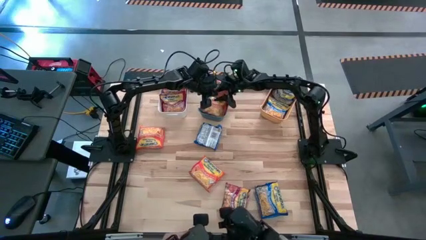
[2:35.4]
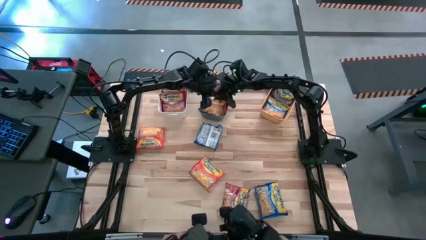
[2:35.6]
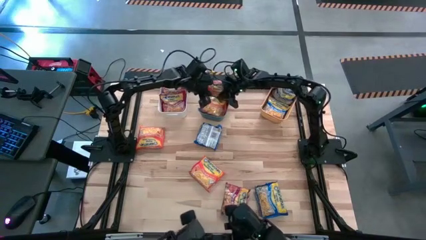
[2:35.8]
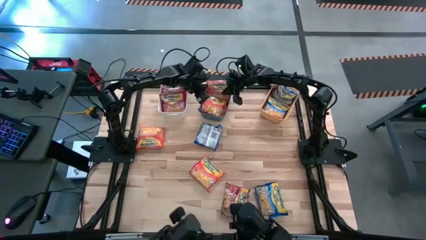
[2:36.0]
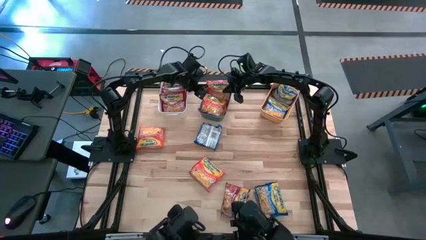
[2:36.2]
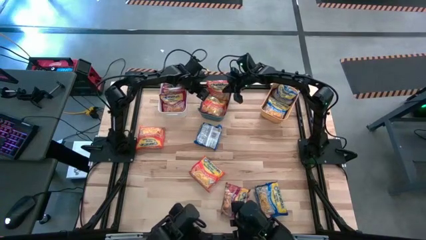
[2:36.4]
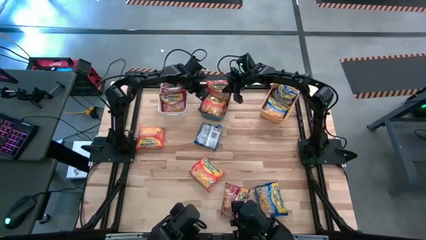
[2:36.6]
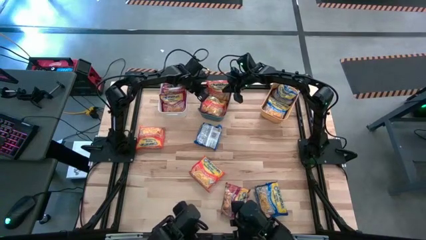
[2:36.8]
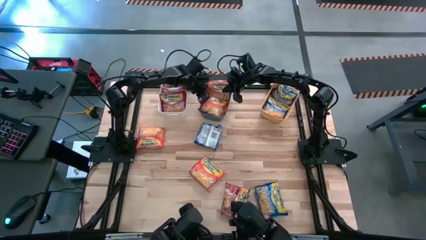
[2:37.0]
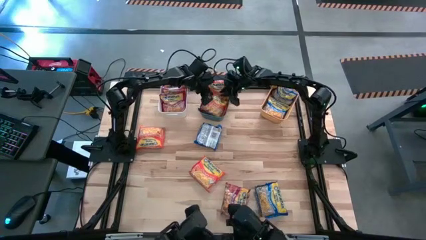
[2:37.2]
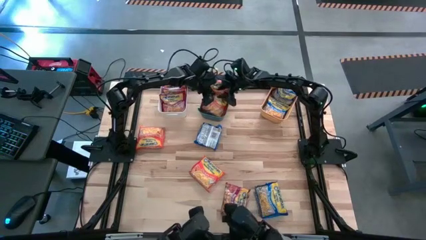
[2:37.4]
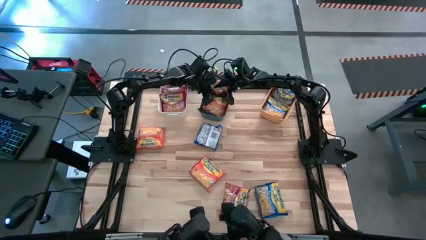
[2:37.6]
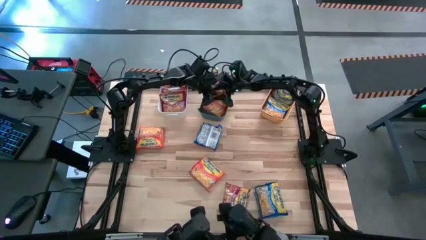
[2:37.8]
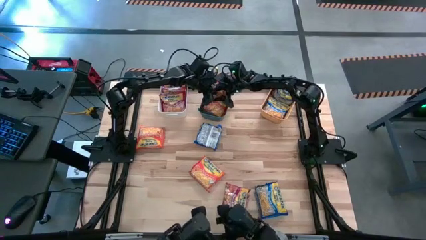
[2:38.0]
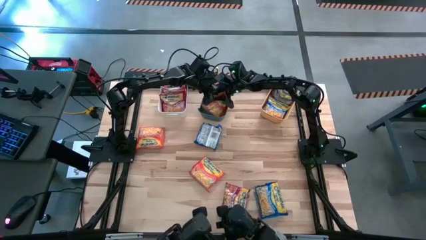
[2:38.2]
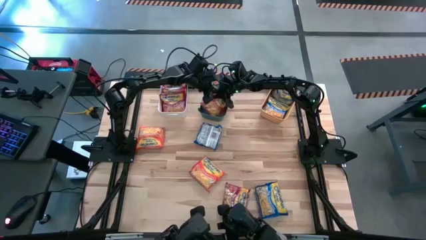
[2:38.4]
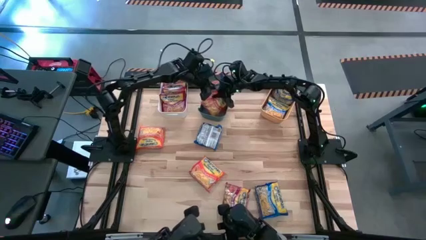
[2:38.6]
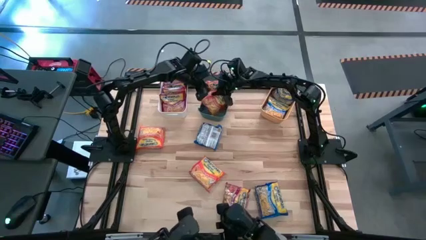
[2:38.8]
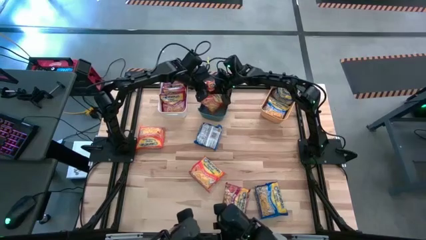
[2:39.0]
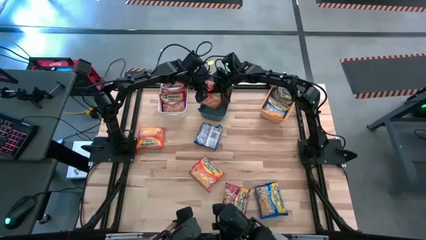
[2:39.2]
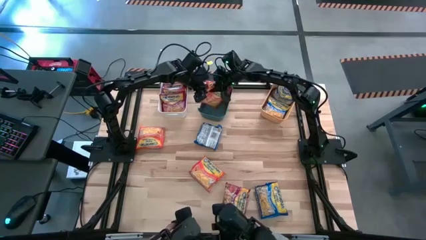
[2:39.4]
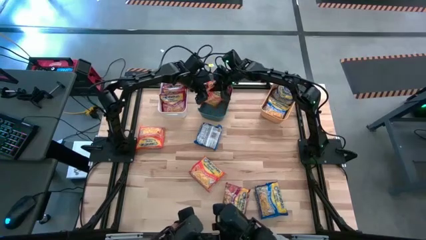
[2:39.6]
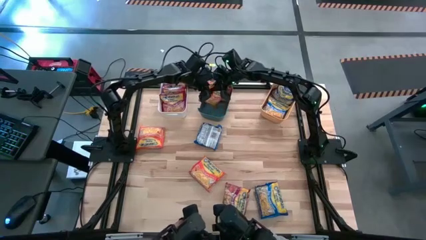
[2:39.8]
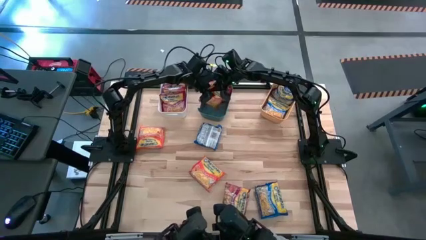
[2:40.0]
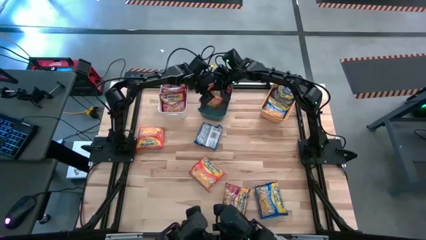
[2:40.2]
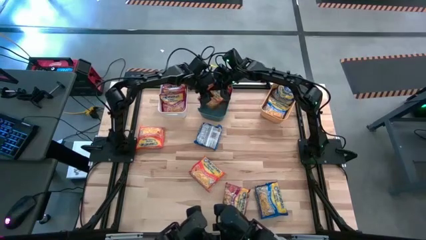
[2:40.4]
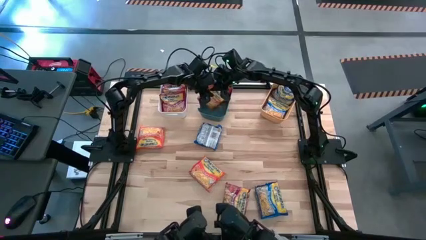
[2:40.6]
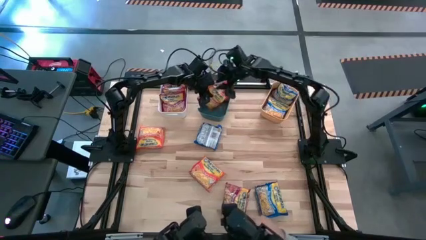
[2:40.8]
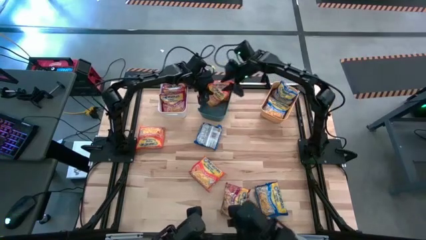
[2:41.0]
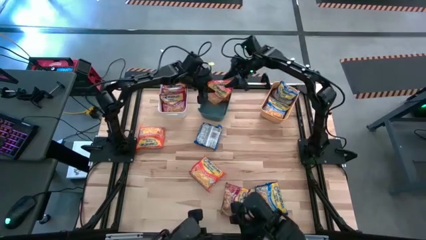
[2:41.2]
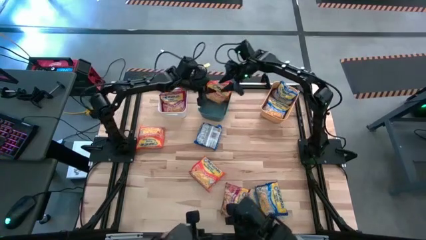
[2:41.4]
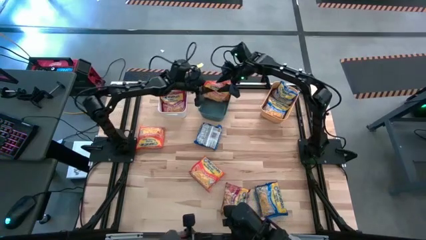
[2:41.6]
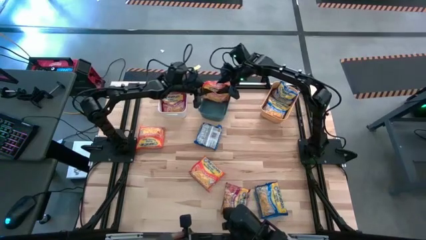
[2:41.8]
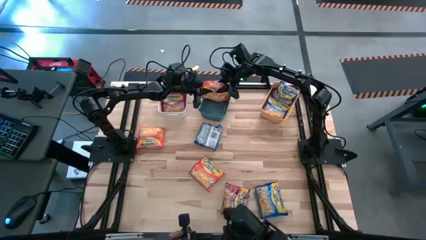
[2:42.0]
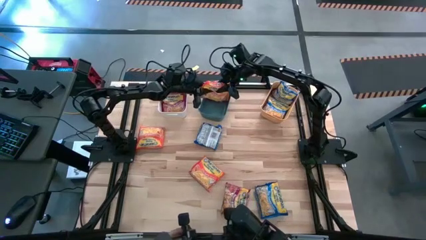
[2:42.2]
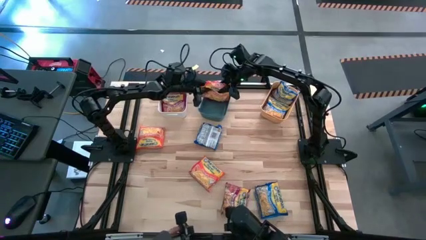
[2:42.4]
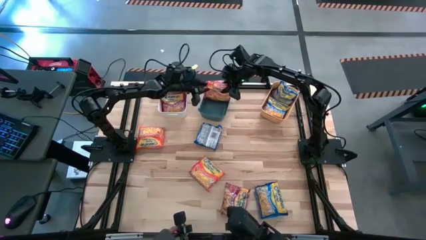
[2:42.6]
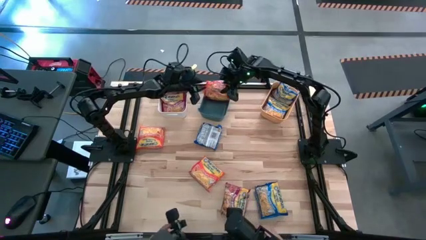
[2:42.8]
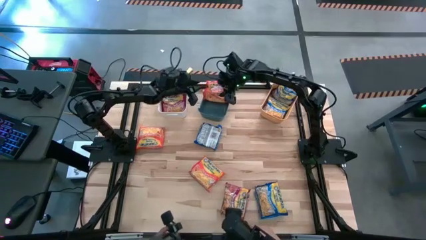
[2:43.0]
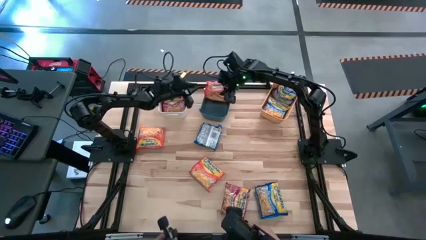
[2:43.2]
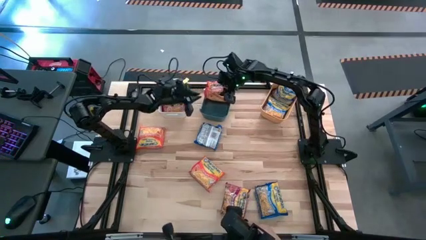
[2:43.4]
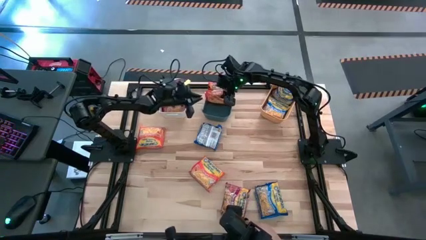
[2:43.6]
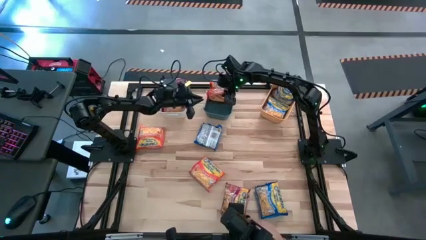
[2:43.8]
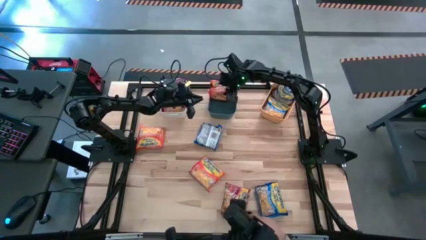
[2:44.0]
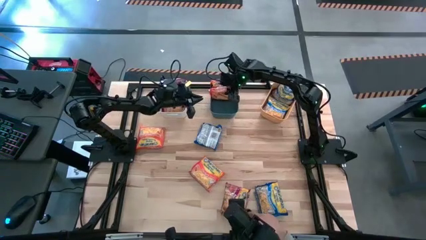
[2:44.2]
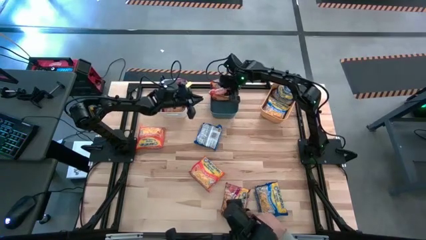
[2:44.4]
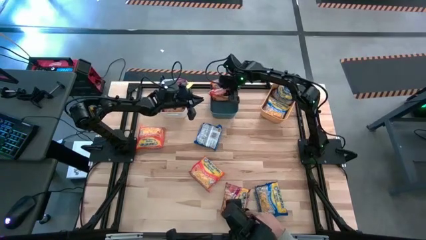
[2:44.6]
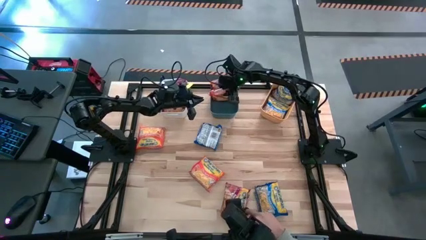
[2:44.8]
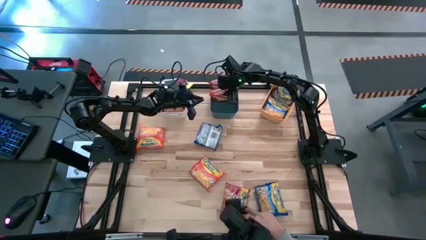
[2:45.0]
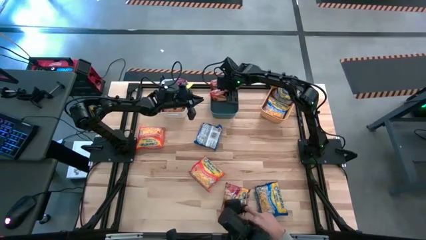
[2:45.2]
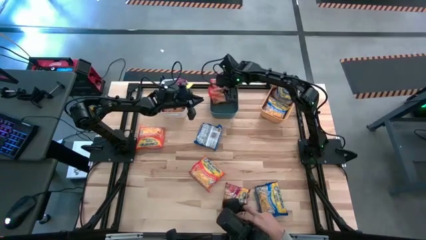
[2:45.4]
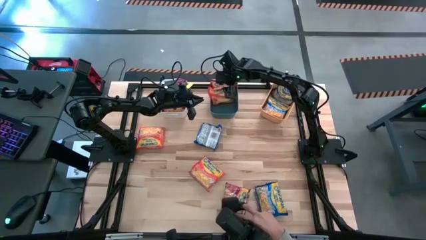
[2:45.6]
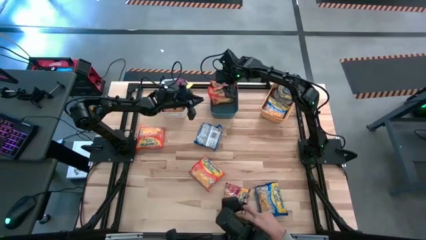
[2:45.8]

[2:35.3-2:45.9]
Task: Sort Maruchan noodles
Adjust the orange noodle packs into the blue bin

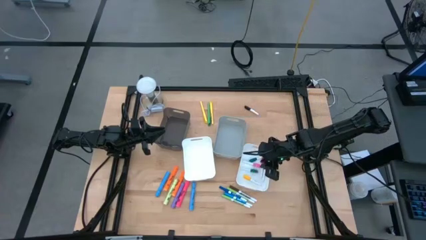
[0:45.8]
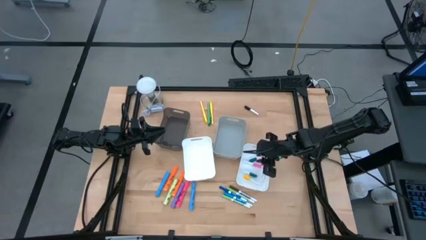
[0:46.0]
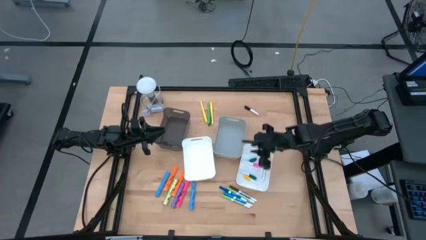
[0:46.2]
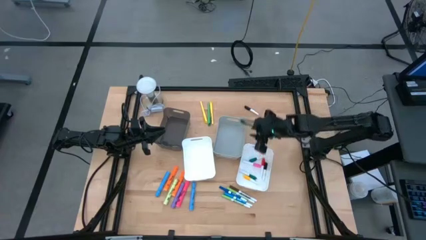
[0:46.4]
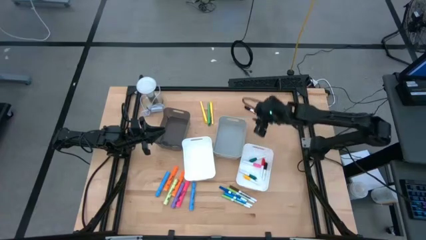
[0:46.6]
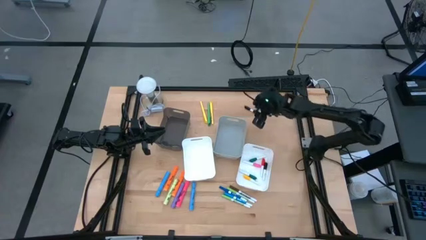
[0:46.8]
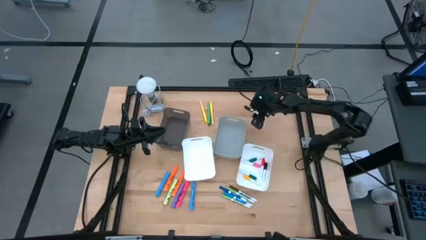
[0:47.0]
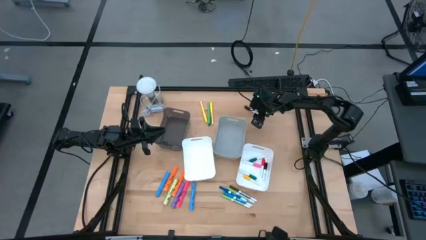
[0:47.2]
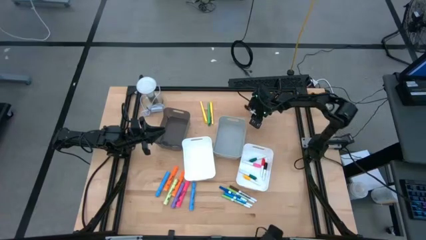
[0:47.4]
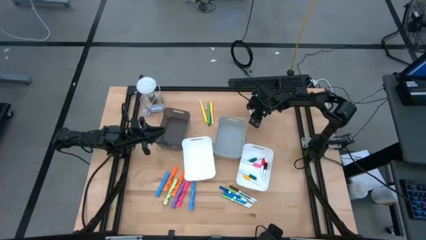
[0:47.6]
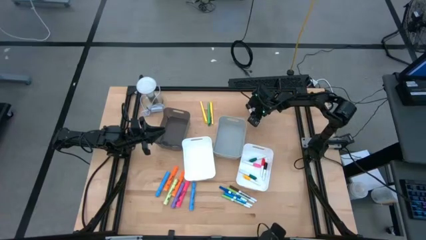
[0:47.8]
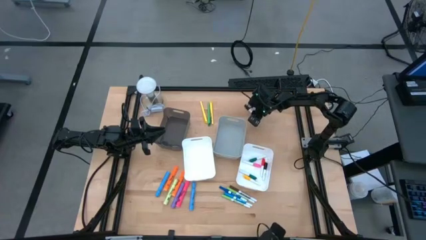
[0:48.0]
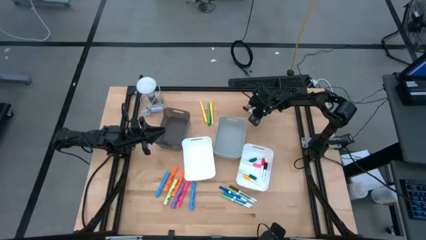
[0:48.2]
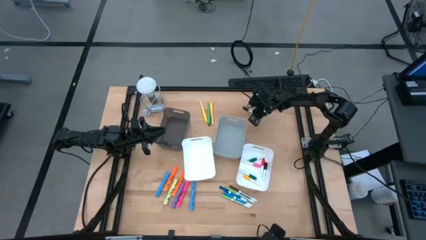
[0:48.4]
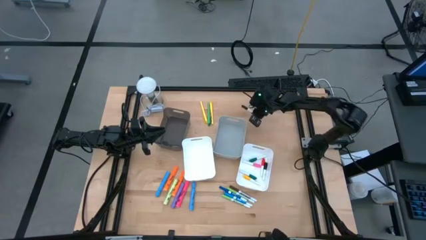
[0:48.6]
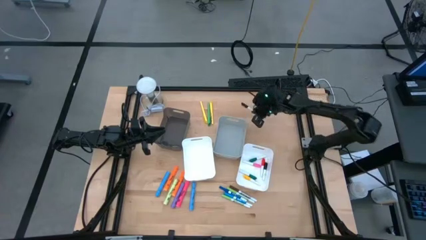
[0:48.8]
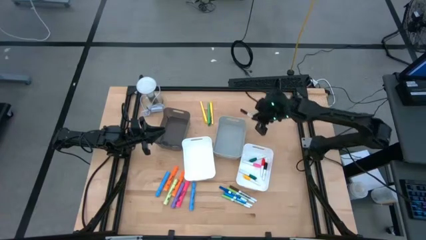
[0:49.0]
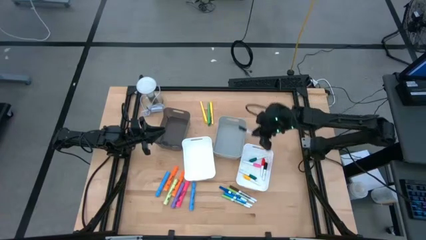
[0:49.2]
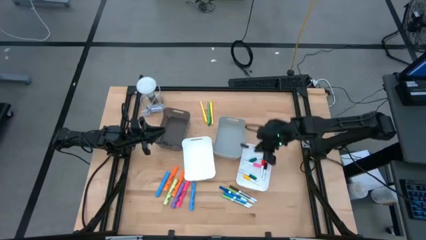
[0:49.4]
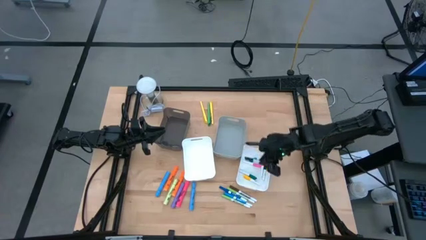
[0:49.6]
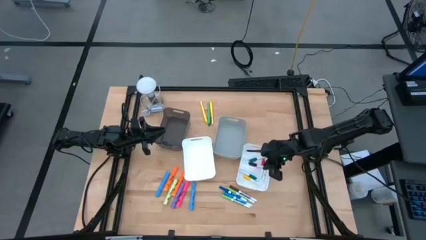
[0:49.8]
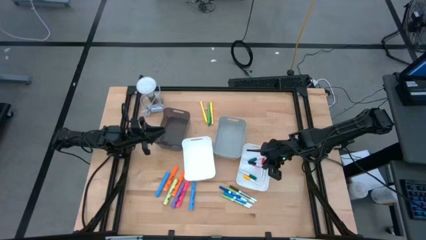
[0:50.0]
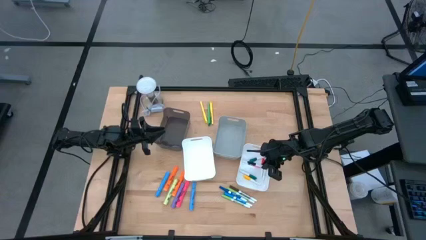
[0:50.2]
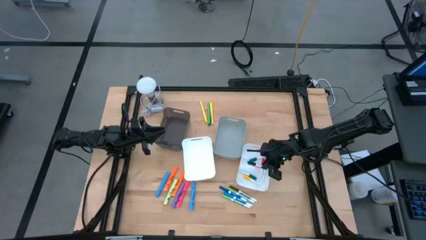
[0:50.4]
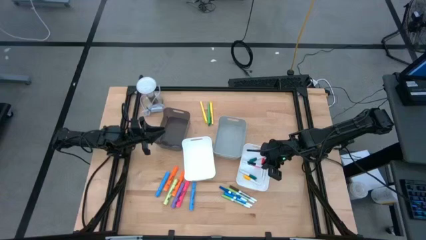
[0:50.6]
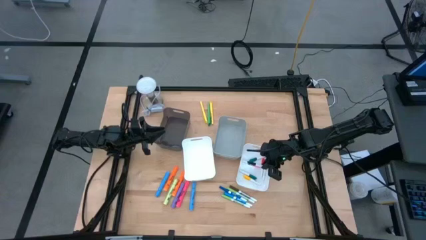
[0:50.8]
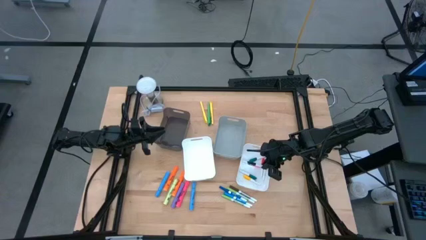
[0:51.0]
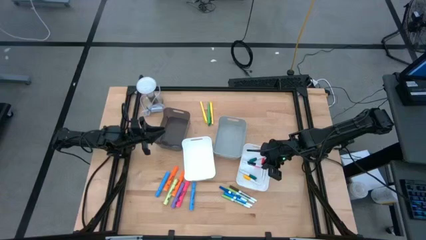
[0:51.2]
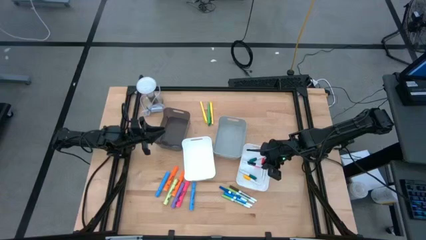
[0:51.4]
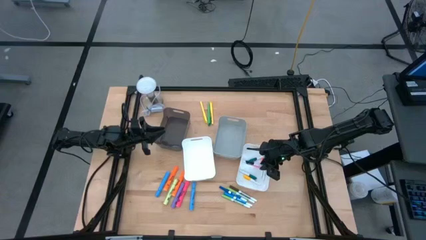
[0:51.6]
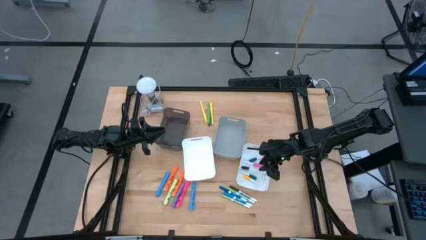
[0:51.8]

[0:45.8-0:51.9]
Task: Pick & Place Markers
Put the black mini marker into the right white bin
